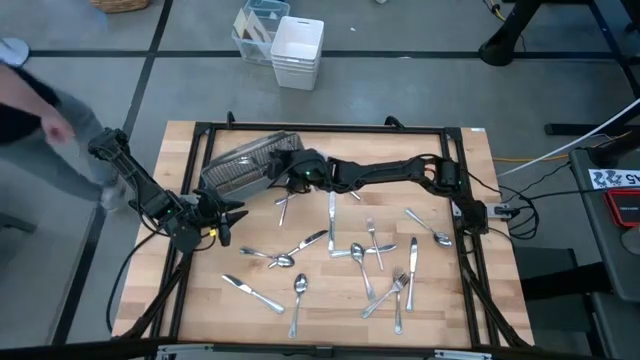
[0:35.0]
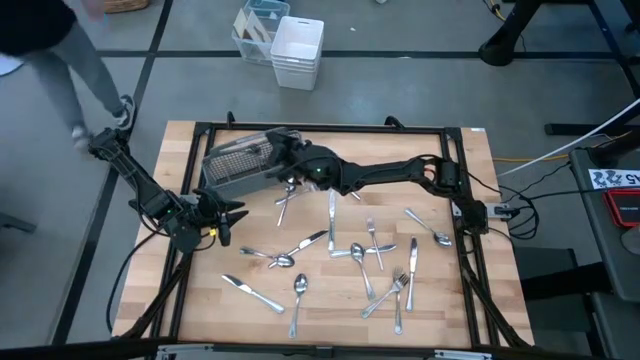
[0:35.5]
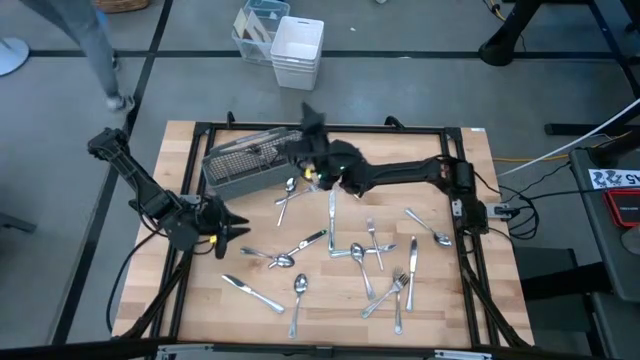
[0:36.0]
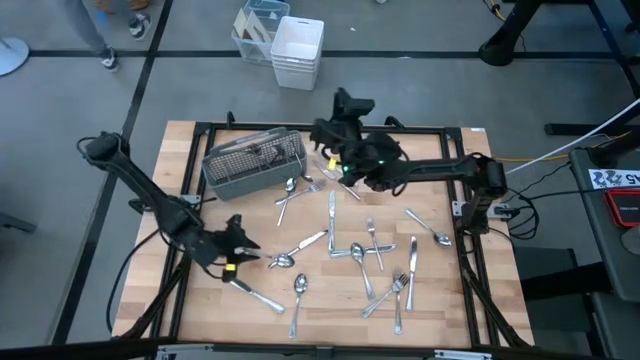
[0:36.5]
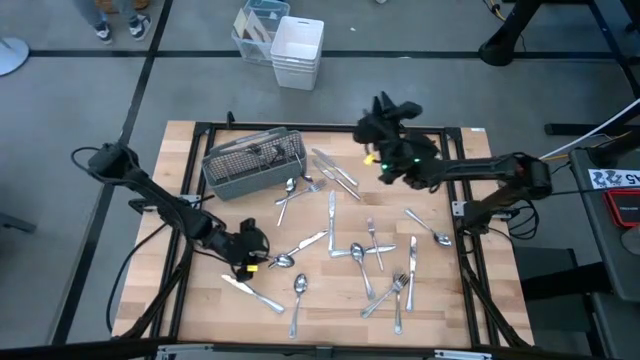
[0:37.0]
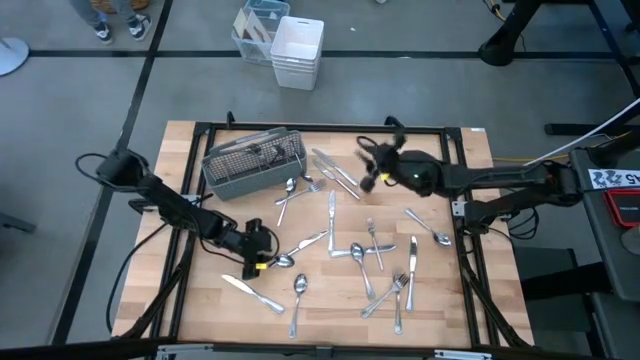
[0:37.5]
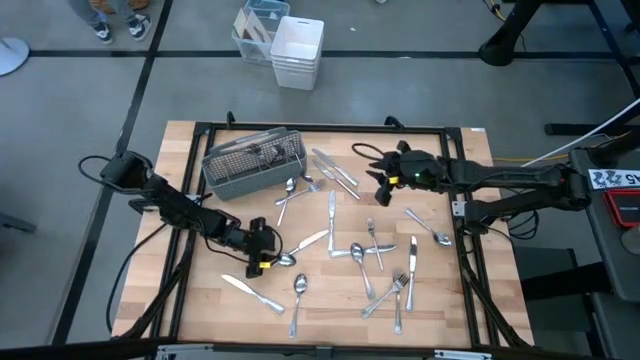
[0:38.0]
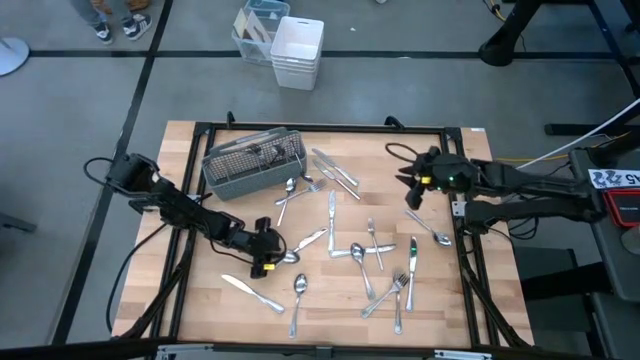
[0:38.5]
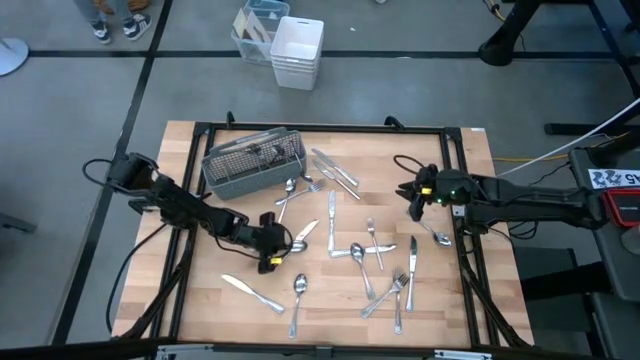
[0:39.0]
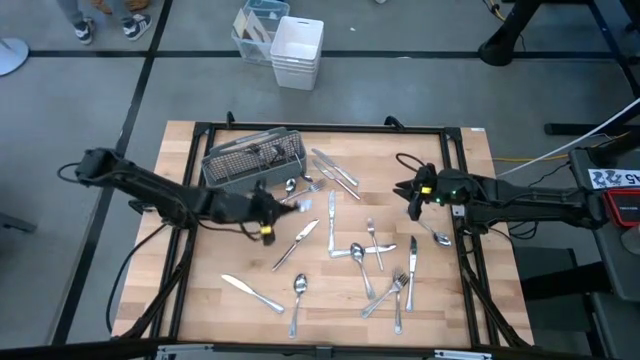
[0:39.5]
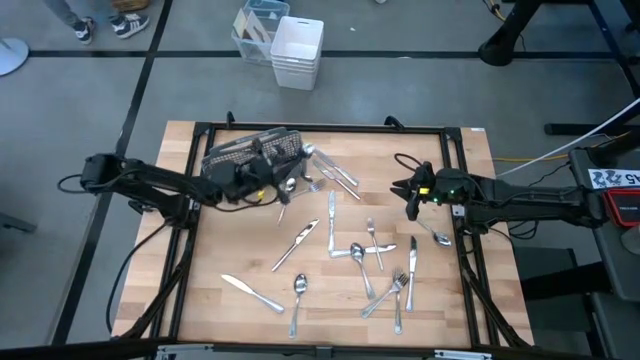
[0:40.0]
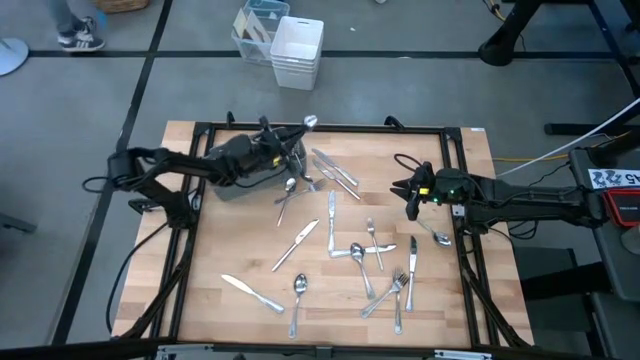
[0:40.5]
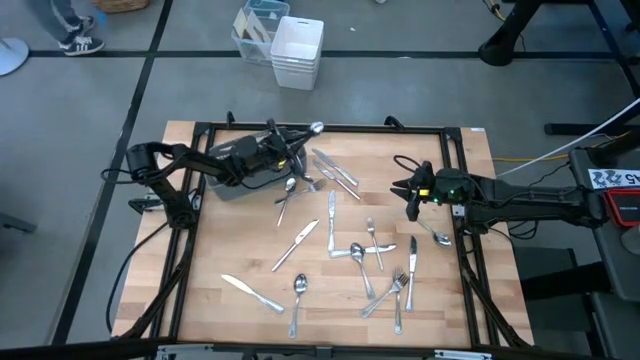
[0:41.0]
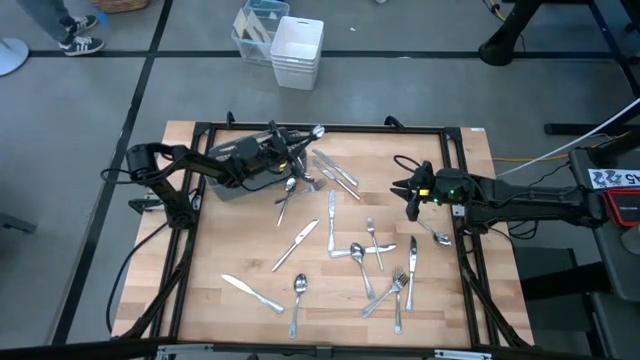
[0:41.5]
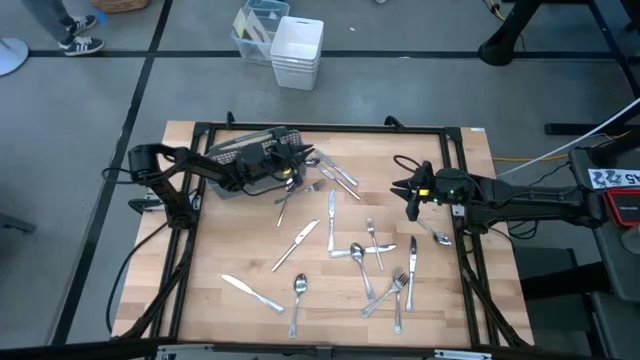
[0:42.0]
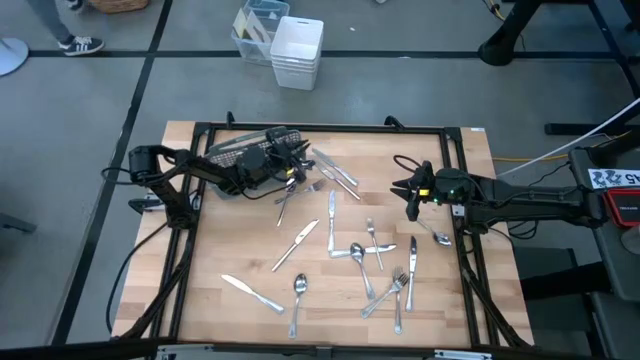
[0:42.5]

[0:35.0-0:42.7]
Task: Sort silverware
Put the silver spoon into the silverware rack

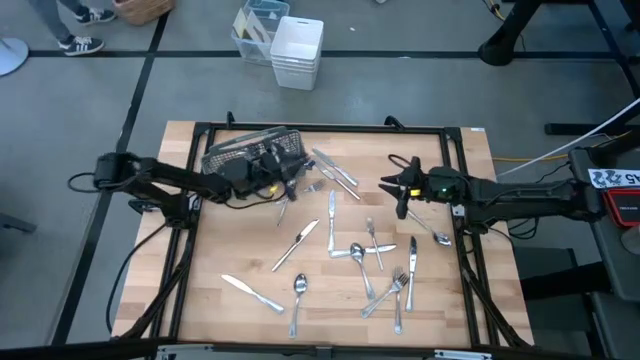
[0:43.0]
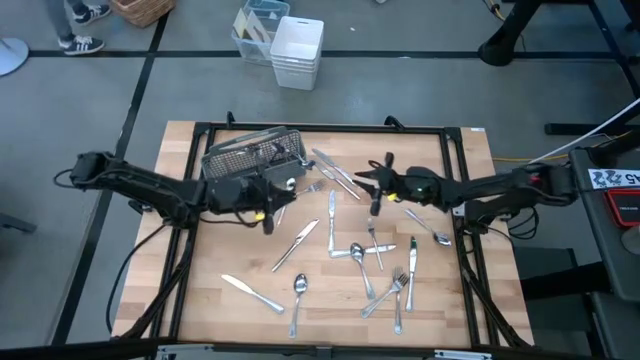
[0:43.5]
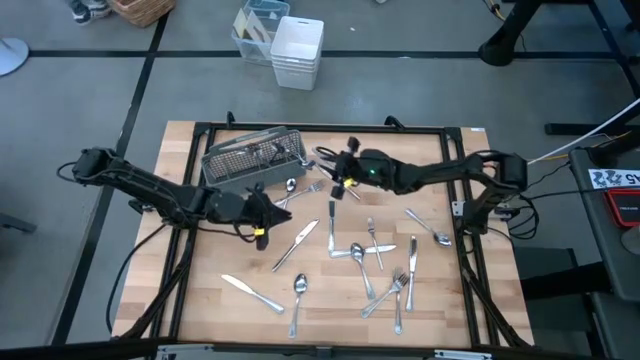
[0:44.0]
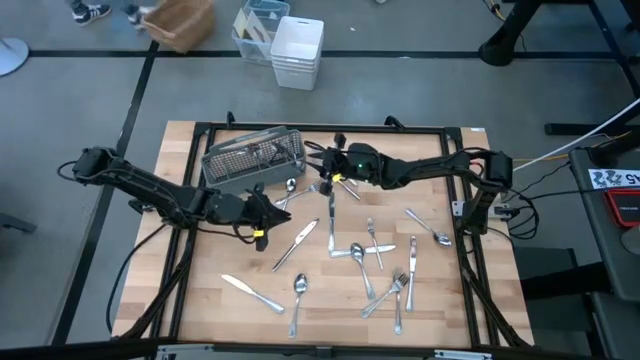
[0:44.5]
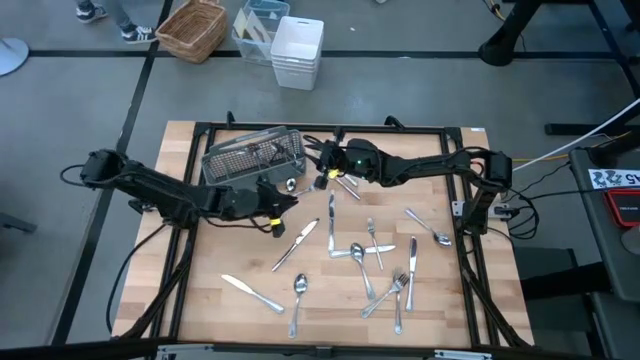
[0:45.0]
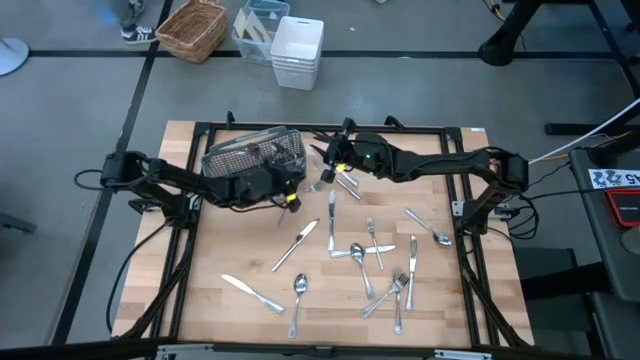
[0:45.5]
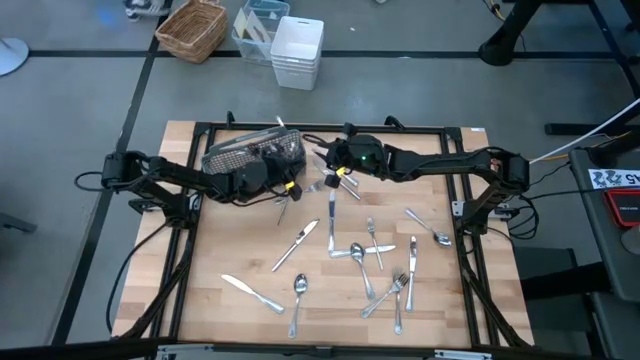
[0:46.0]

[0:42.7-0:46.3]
Put the silver spoon into the silverware rack

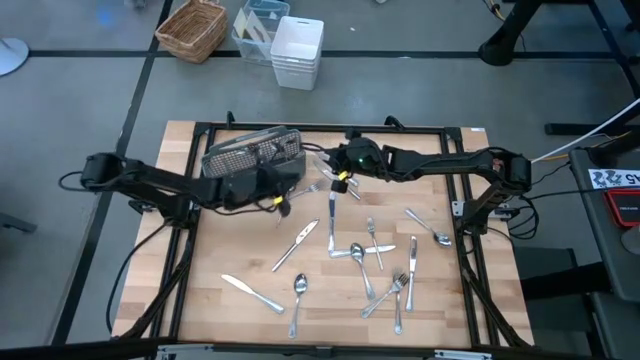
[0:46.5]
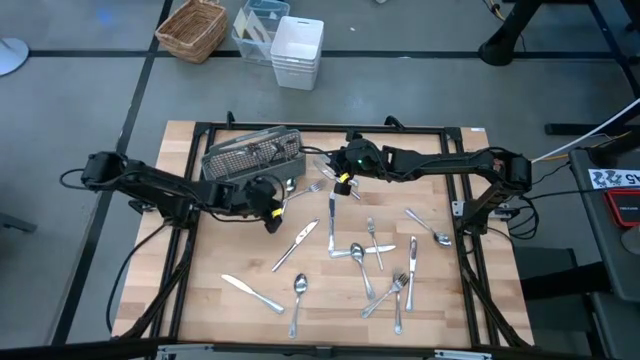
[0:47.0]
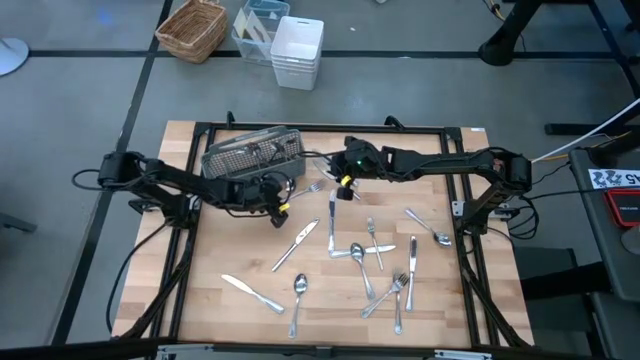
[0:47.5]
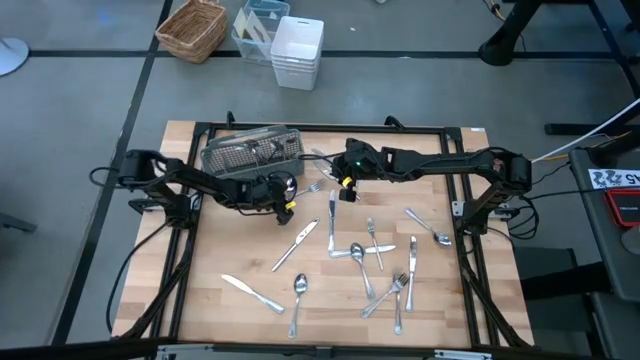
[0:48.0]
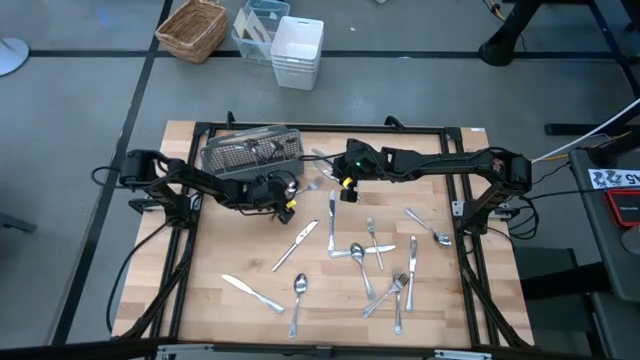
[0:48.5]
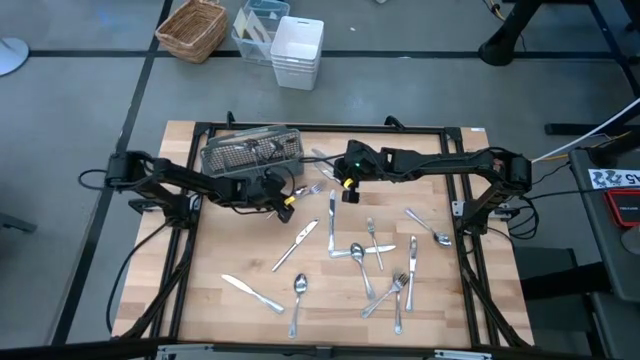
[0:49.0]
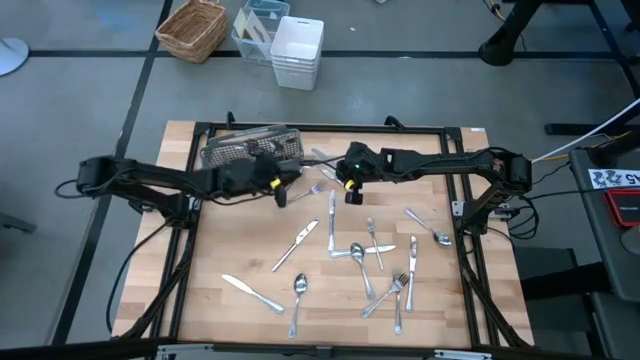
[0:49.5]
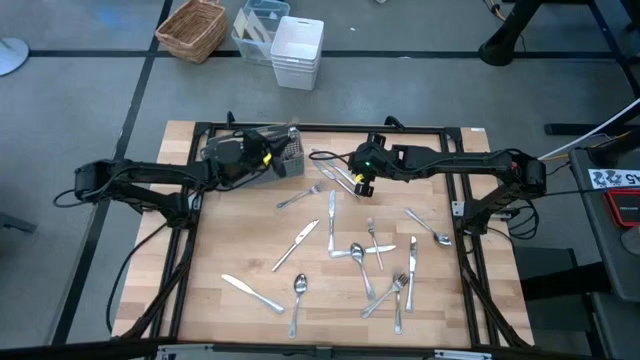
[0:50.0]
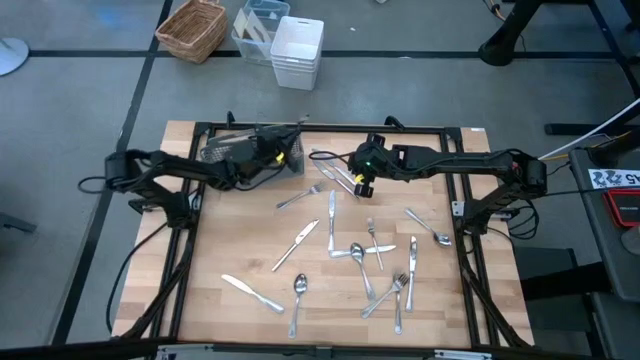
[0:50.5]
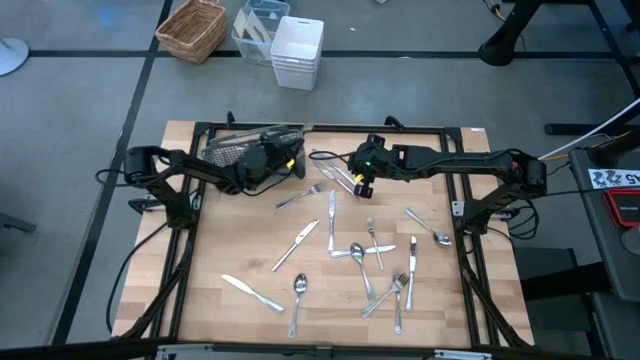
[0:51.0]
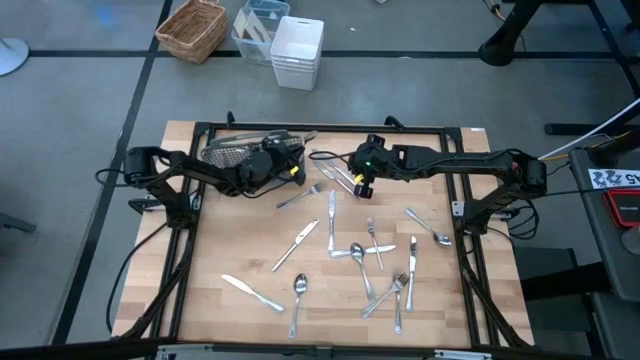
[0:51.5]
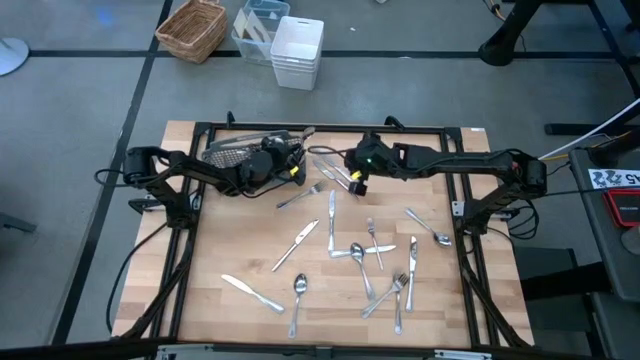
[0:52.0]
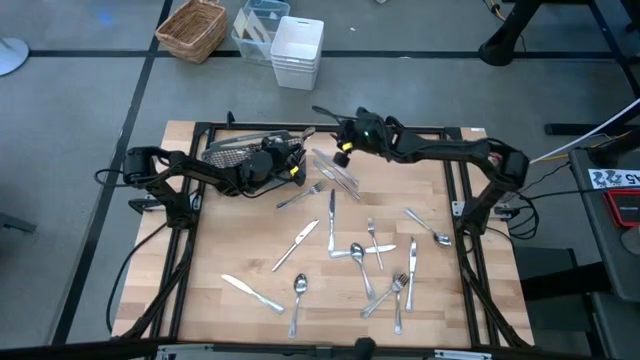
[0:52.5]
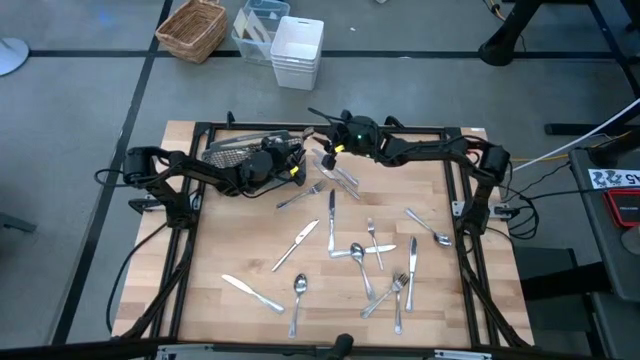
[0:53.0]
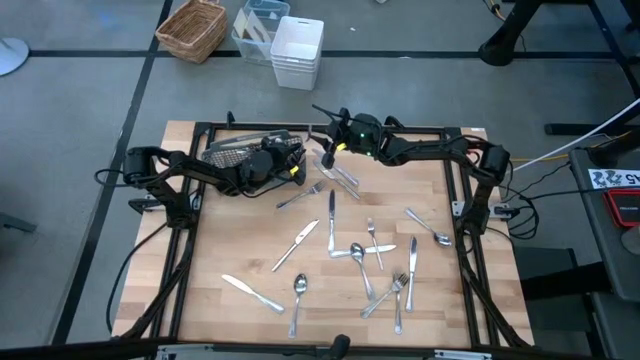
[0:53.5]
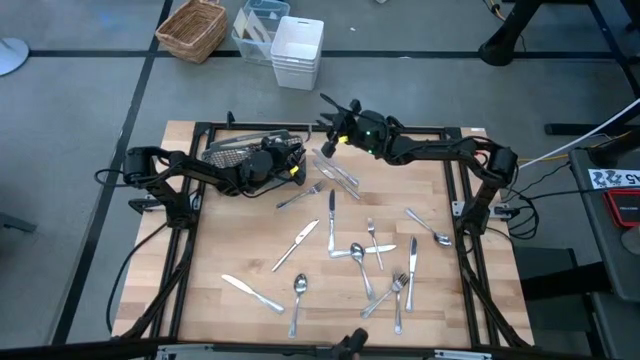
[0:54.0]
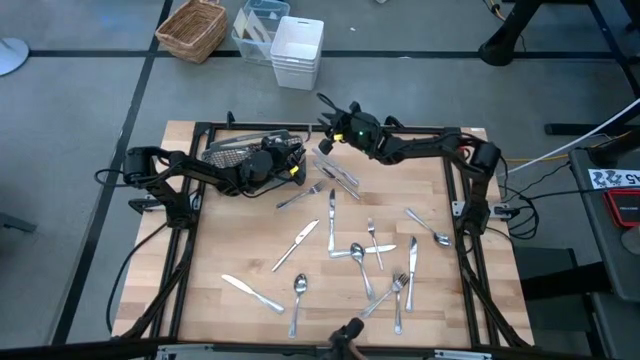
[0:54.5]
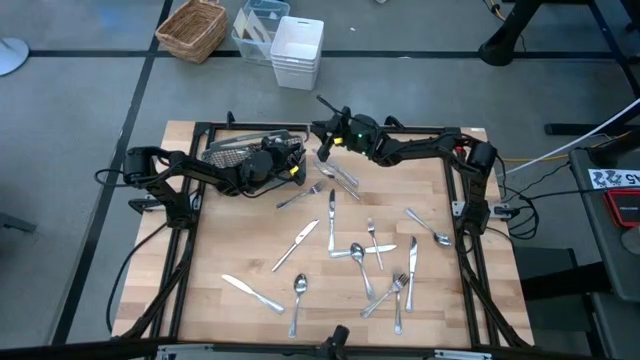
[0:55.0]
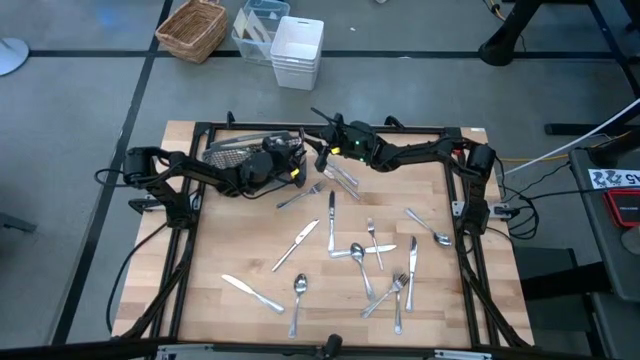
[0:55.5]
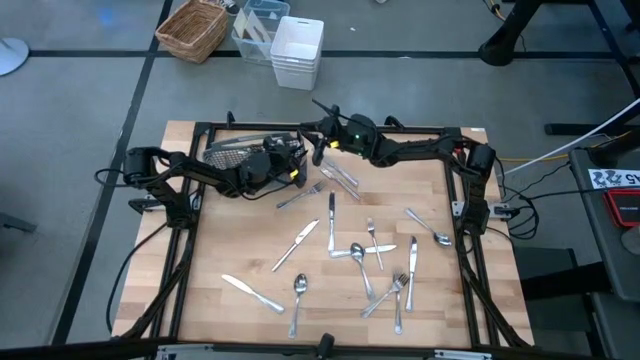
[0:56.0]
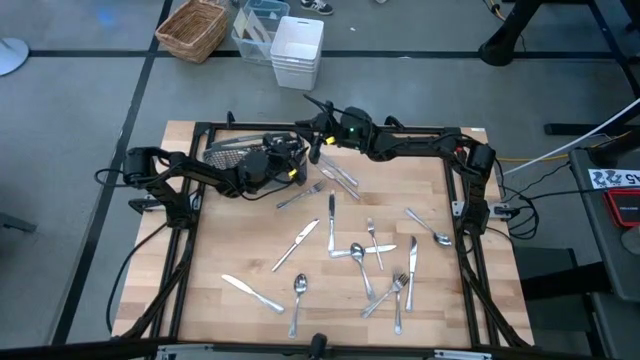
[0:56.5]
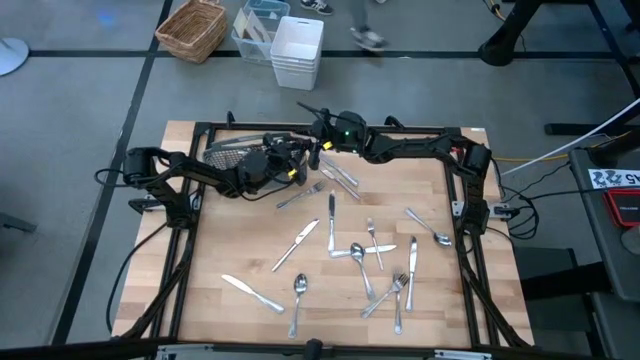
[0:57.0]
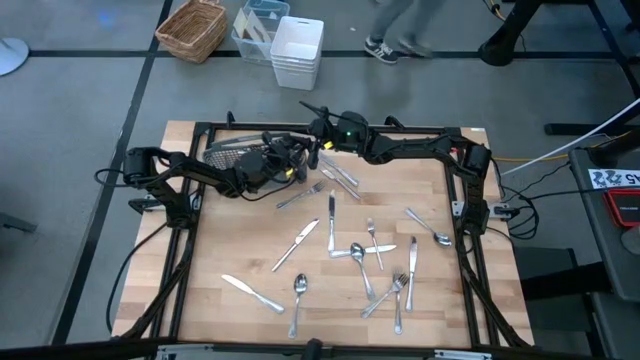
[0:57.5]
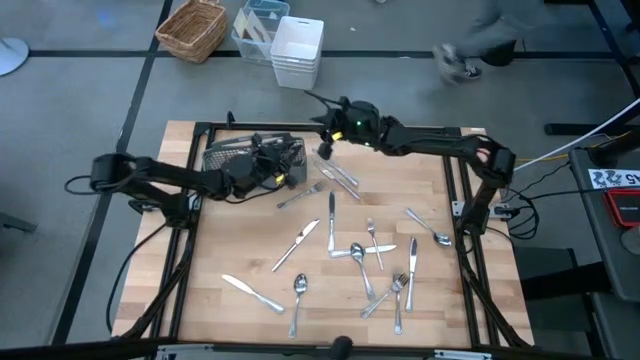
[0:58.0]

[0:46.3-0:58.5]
Put the silver spoon into the silverware rack
